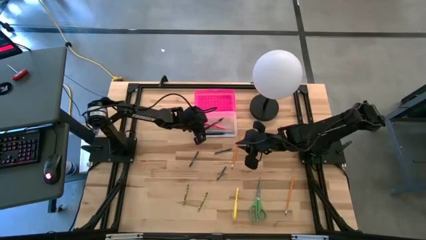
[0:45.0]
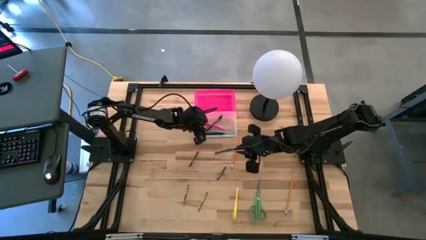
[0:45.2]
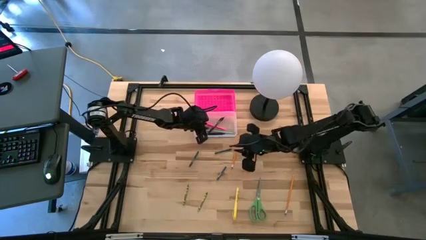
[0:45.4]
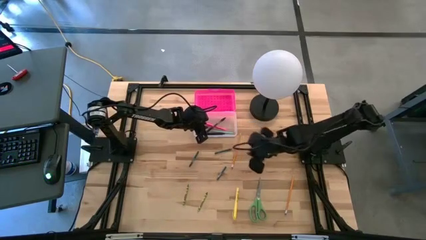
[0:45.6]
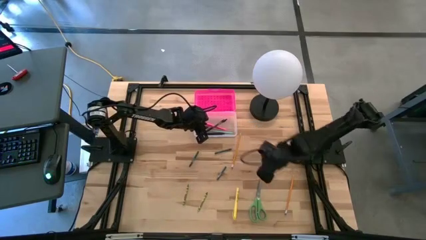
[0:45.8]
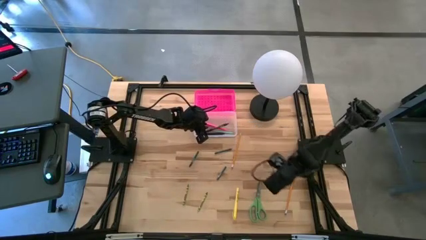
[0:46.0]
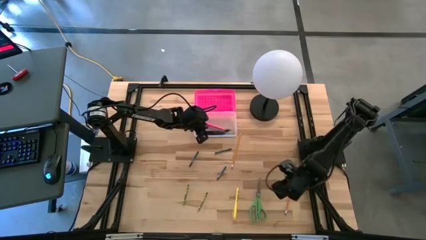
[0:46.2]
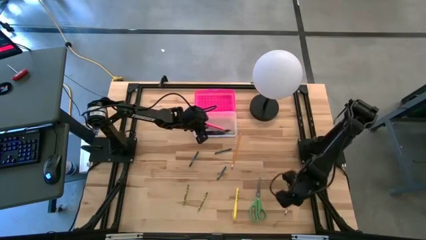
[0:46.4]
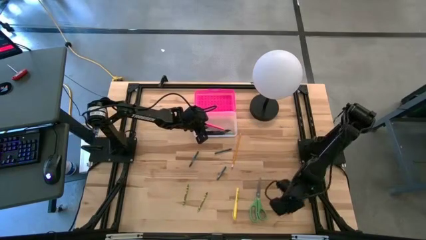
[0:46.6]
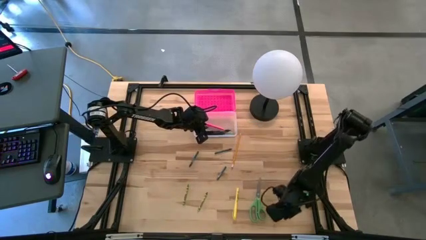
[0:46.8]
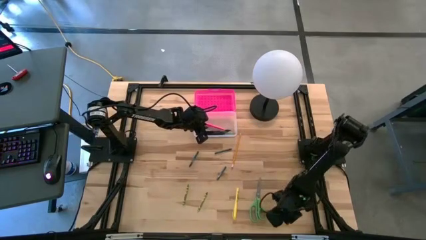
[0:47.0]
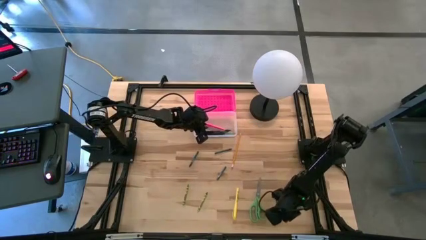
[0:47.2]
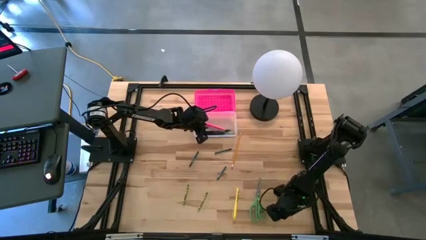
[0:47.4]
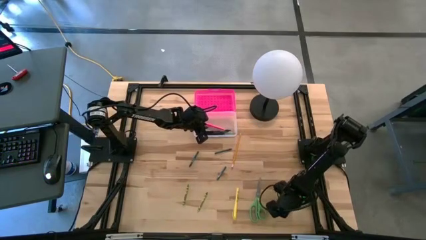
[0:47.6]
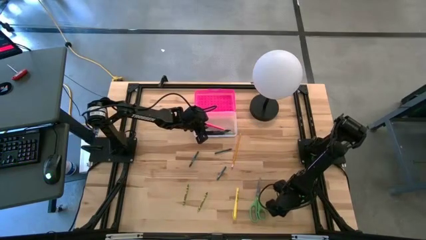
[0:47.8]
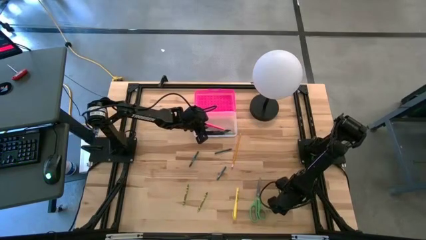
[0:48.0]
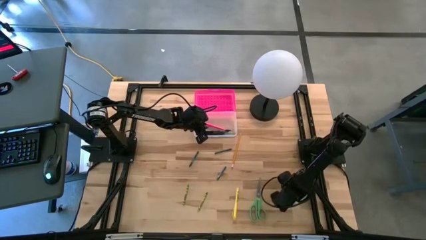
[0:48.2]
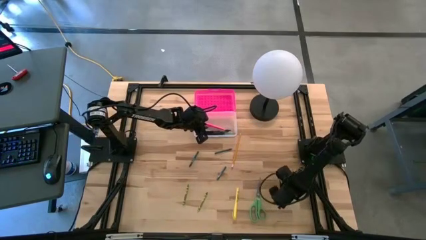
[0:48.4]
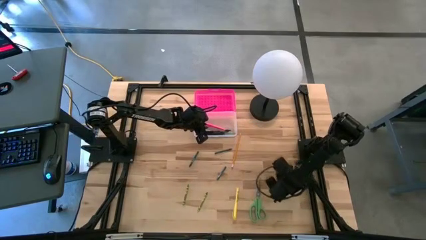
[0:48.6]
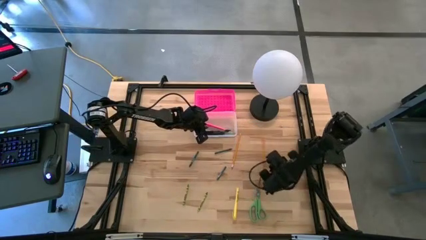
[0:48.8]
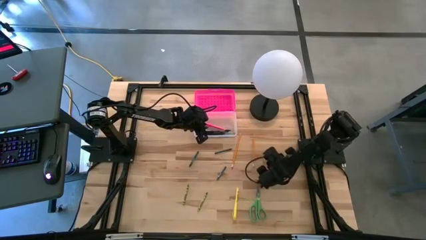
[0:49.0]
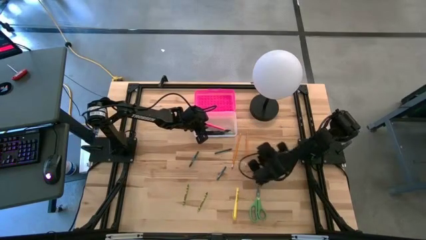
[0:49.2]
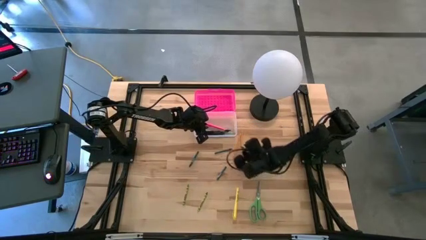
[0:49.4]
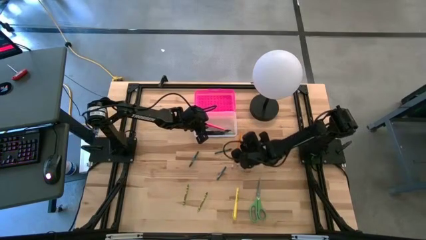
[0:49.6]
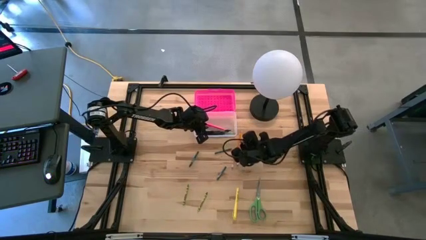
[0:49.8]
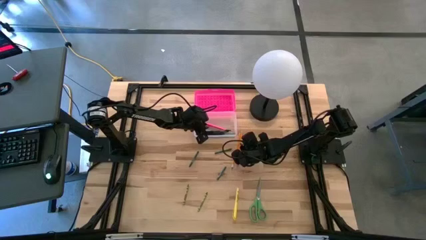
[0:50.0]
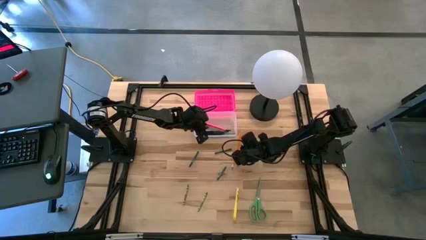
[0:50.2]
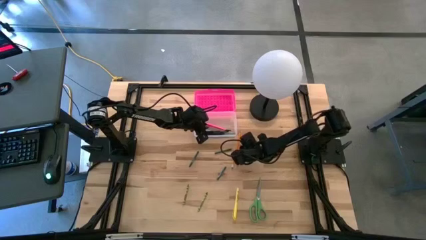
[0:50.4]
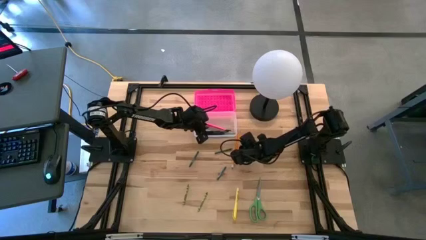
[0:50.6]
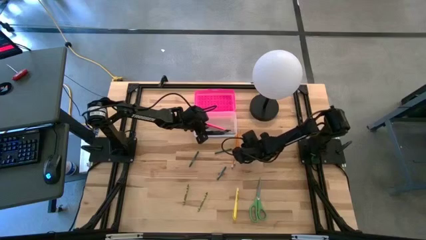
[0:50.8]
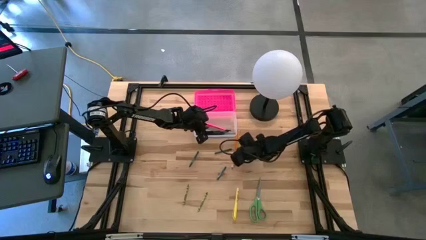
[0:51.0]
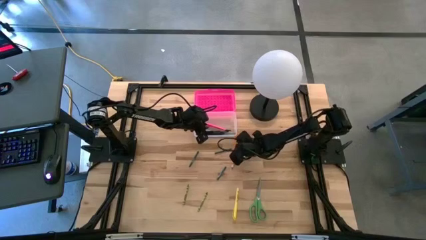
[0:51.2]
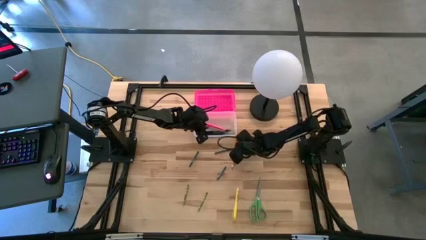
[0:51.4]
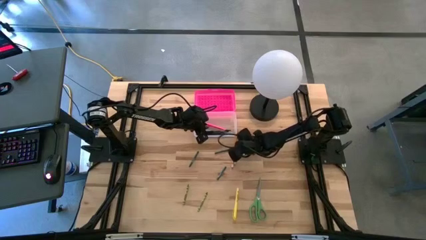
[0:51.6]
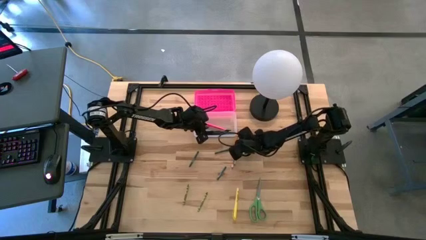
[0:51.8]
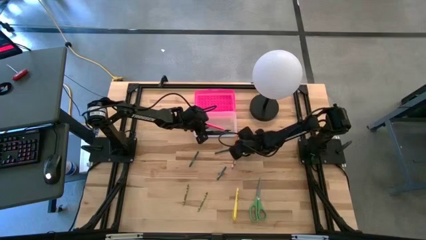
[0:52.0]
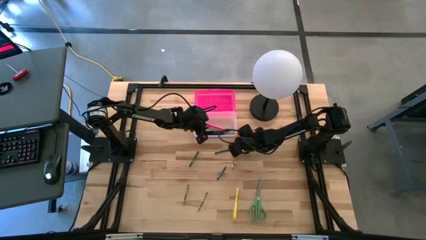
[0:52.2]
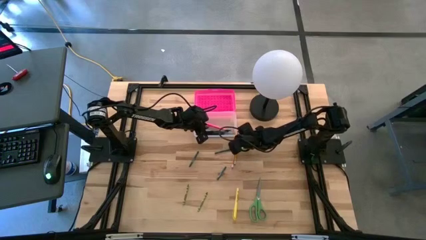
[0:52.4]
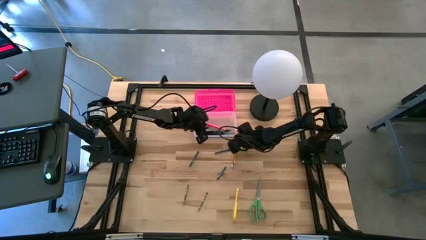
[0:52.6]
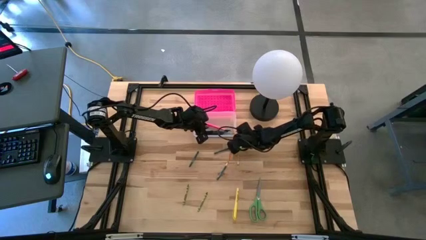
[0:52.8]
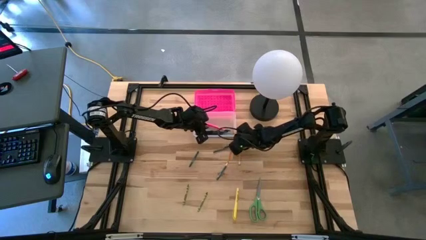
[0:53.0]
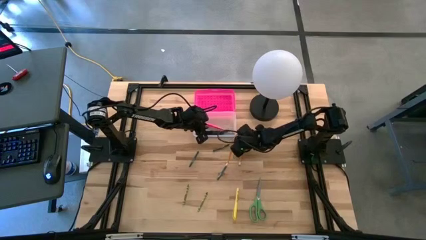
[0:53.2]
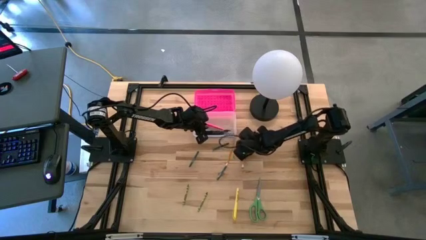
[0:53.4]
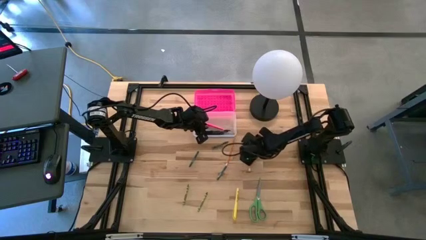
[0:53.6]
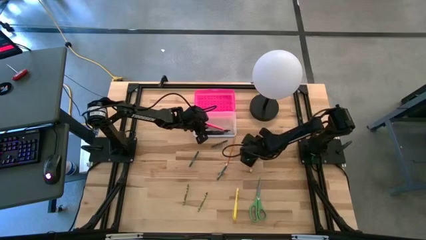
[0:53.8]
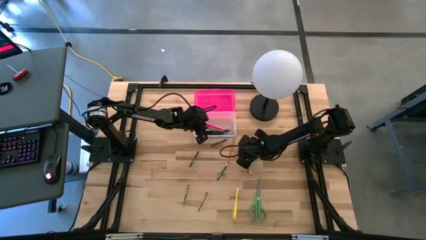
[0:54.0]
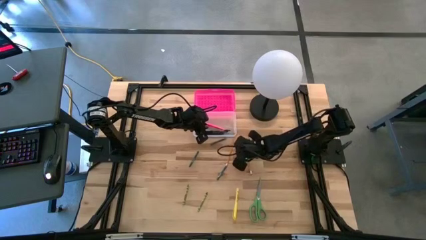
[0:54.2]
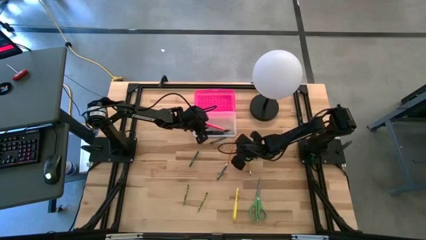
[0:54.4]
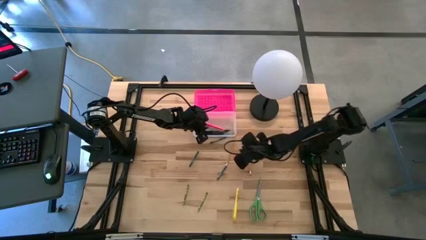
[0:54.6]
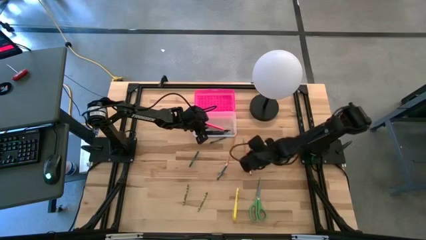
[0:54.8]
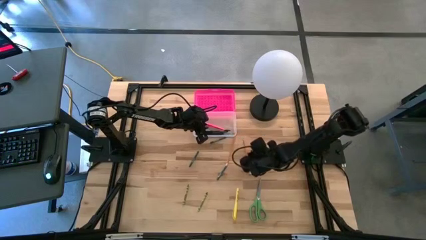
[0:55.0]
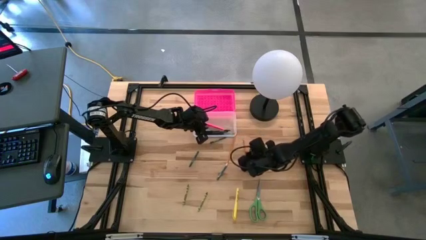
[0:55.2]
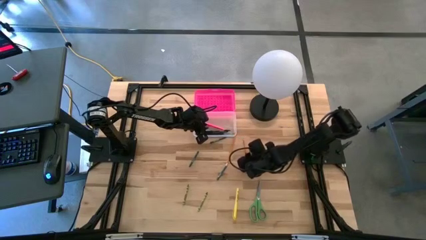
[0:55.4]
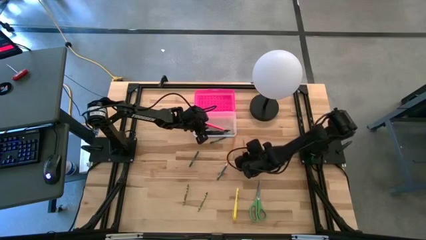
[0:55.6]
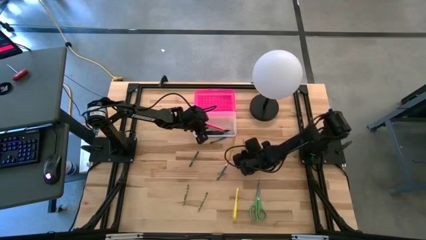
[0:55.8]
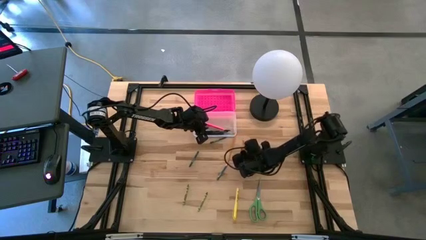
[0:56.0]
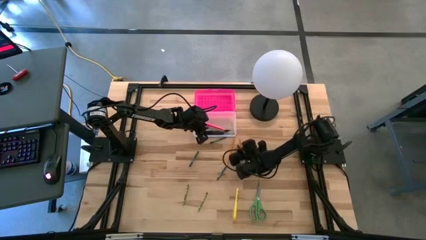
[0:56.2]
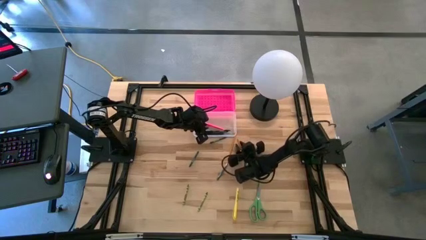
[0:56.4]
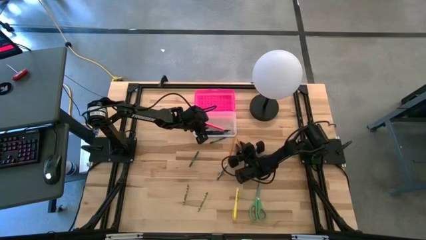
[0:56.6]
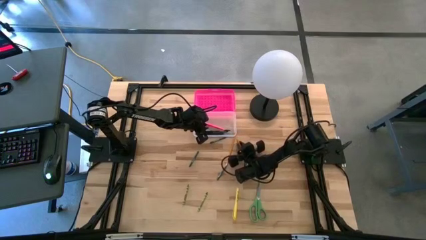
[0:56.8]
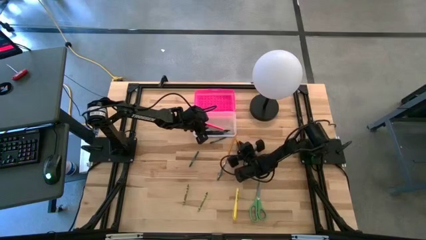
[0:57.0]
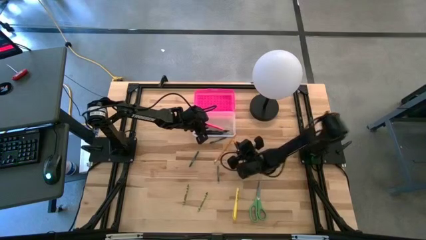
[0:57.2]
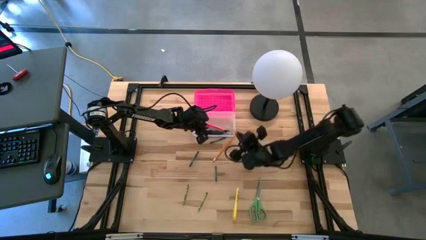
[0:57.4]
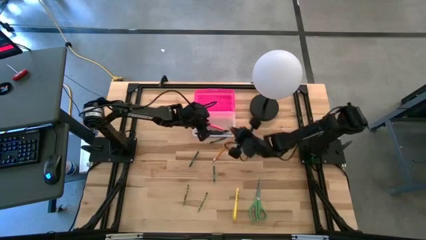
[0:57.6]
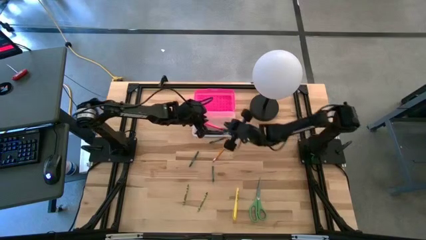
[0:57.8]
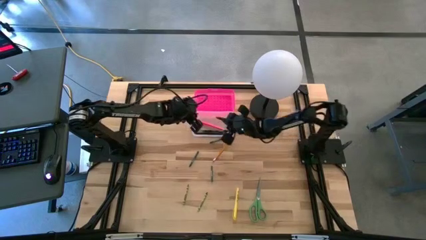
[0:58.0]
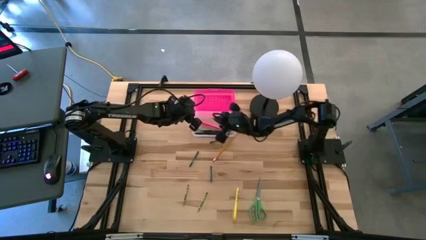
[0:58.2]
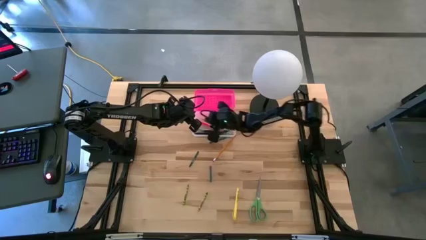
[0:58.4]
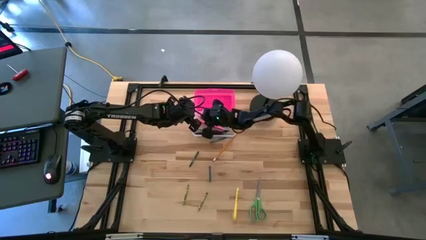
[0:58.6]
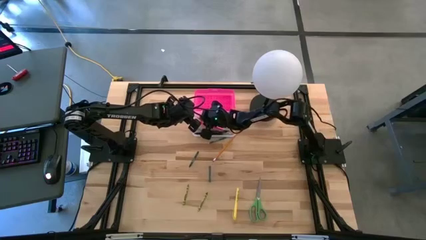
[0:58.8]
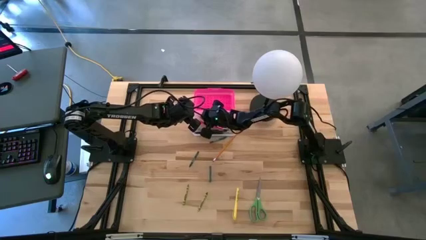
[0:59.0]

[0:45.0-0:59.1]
Task: Pick & place school supplies into a supply box
Put the bottom orange pencil into the transparent supply box
